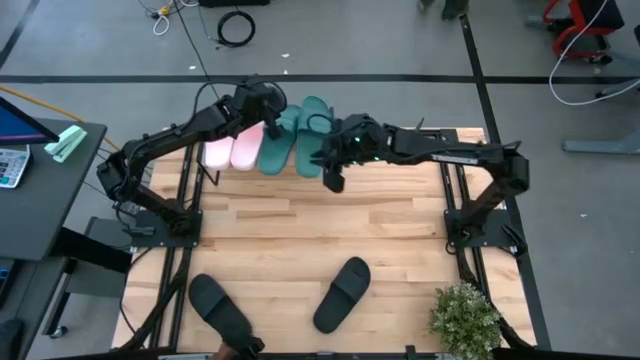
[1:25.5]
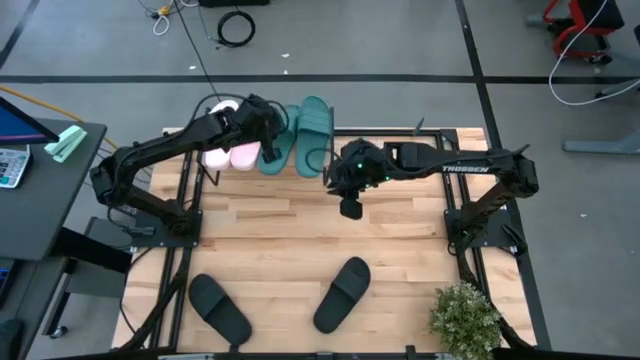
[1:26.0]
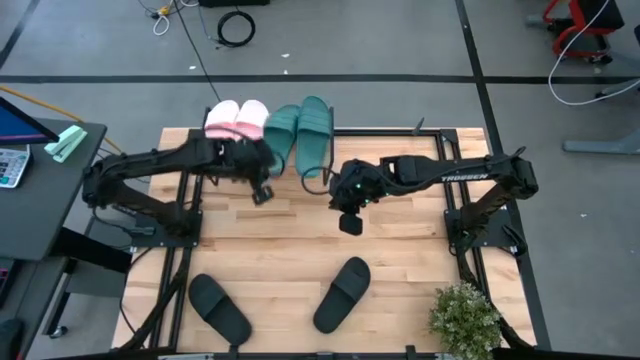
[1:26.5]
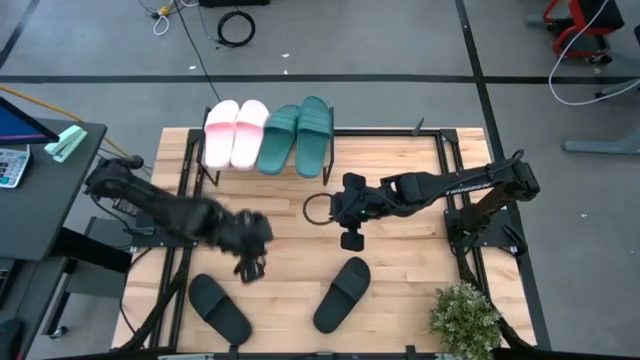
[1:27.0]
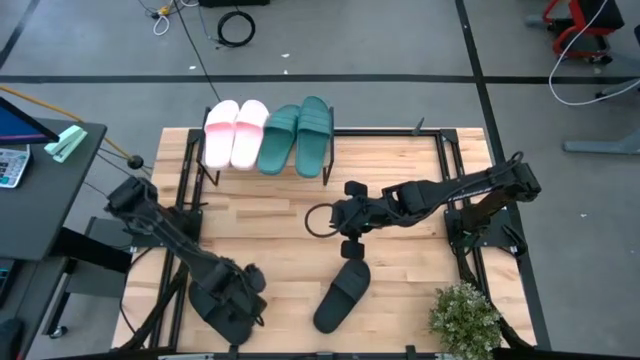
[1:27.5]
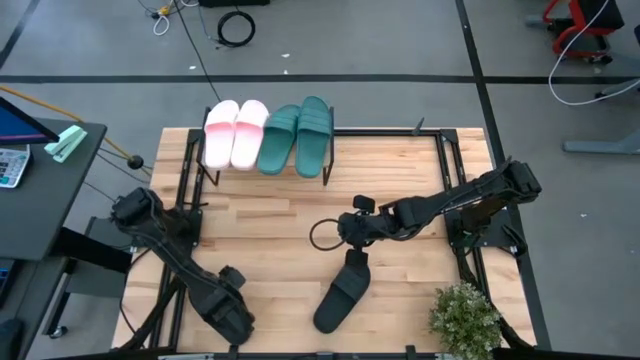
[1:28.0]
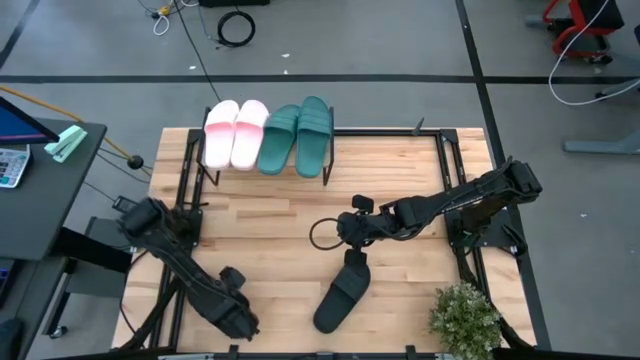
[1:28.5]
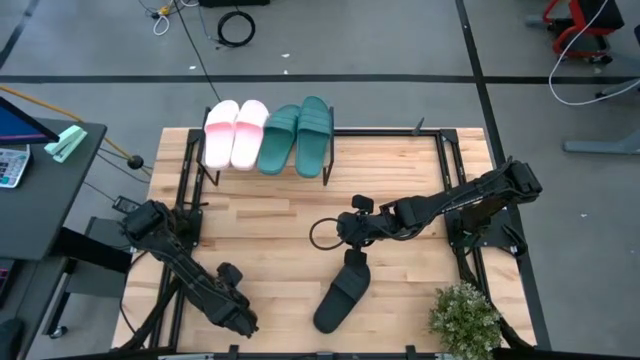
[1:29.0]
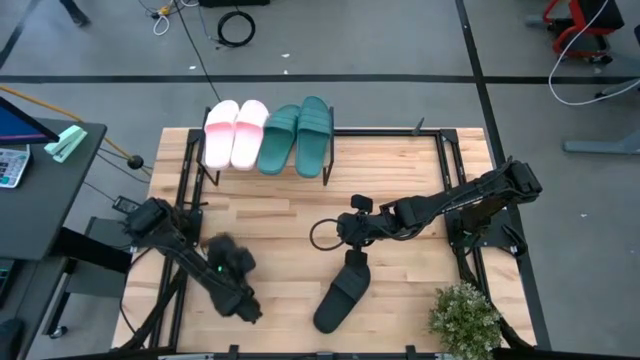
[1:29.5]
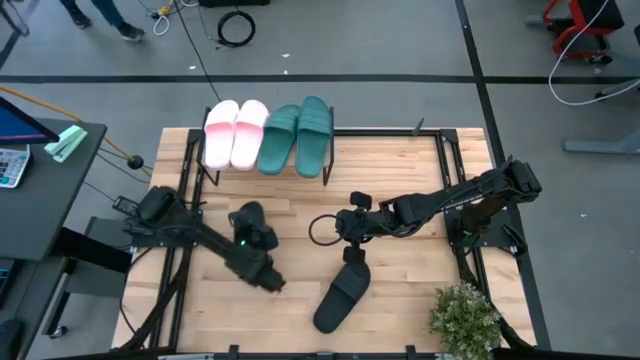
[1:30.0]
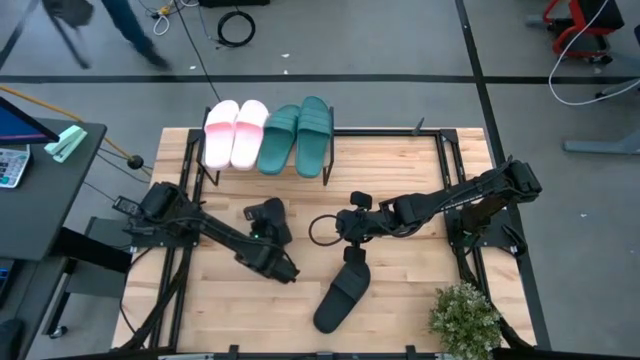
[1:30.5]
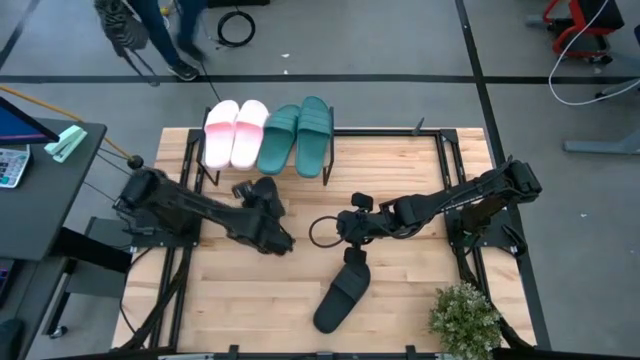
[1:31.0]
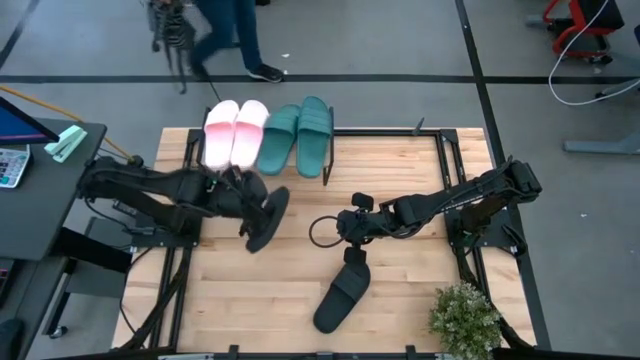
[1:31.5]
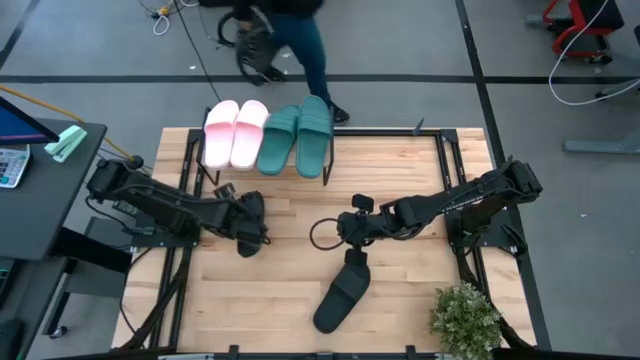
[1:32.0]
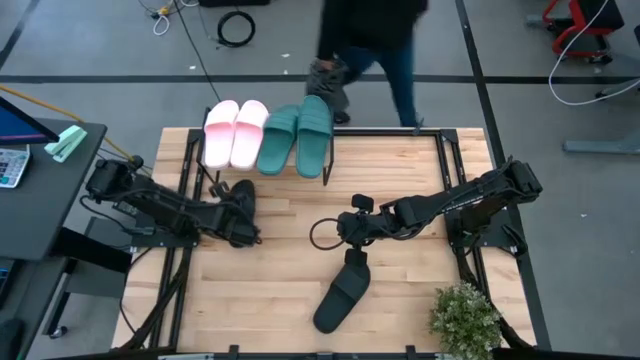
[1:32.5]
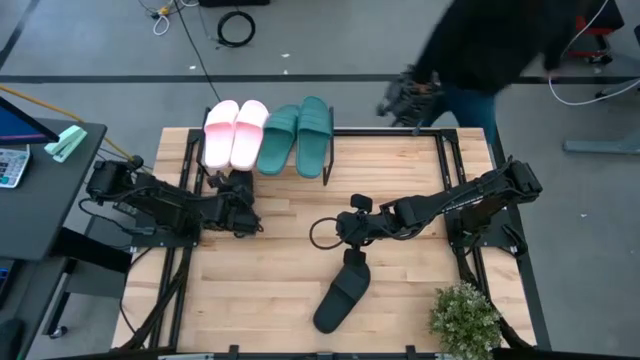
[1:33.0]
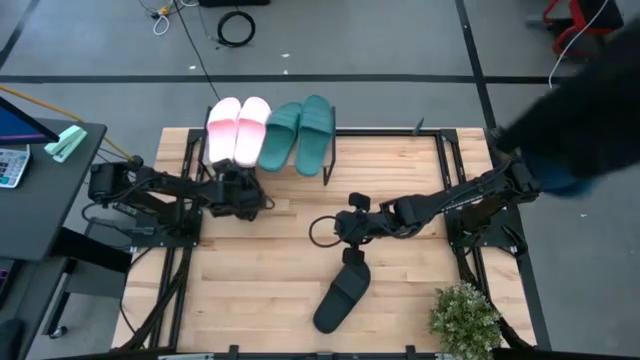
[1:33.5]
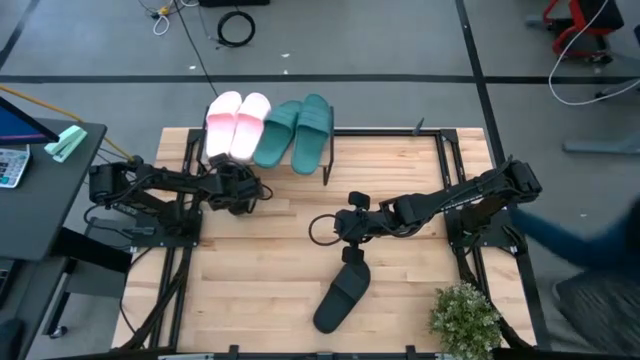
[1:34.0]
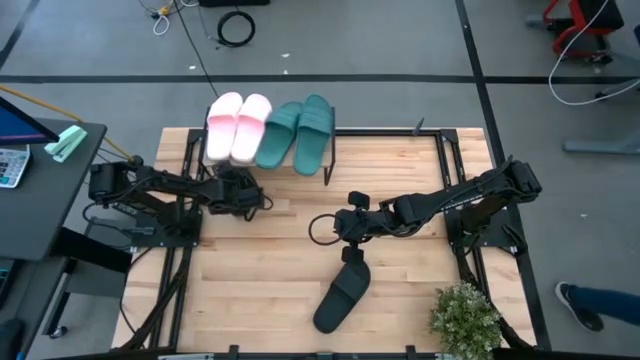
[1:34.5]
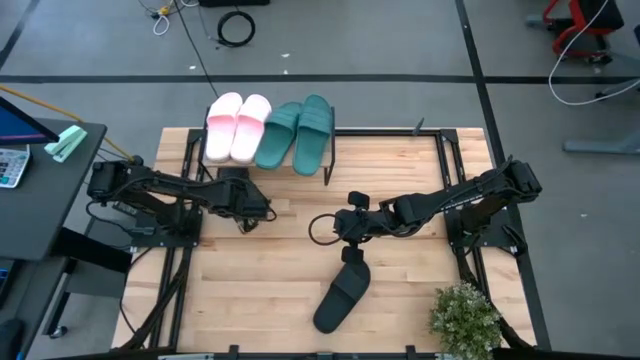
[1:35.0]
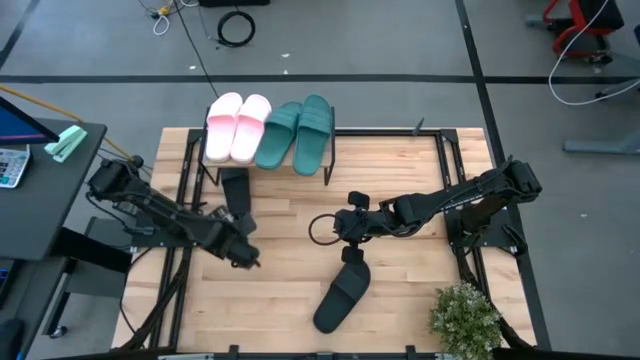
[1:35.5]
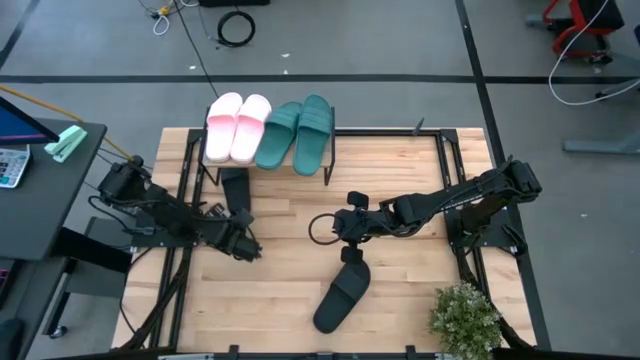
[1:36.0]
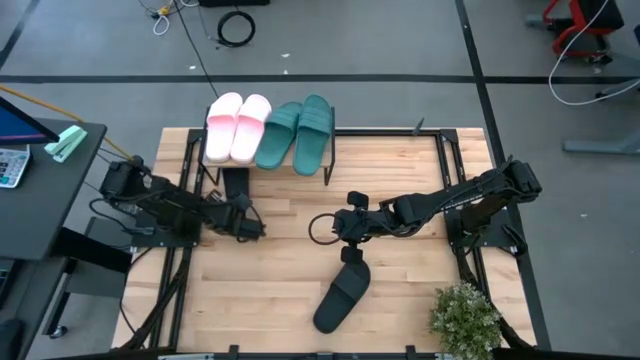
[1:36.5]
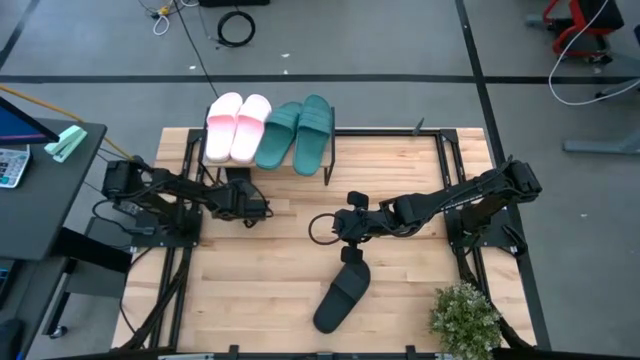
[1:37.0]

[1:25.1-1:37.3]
Task: Pick and place slides into the shelf
Put the left black slide under the shelf

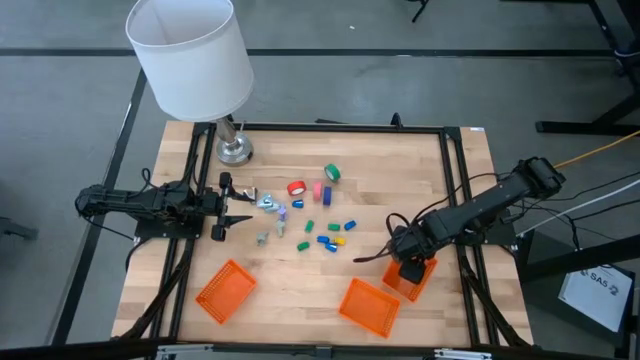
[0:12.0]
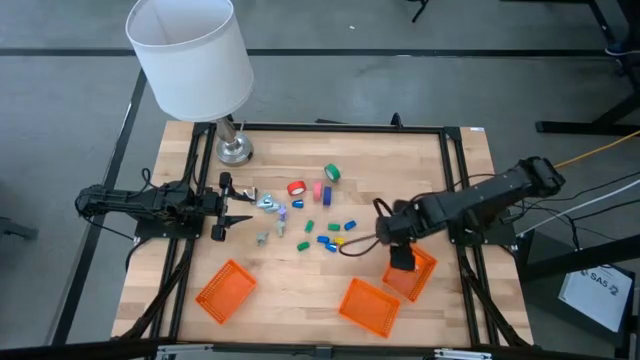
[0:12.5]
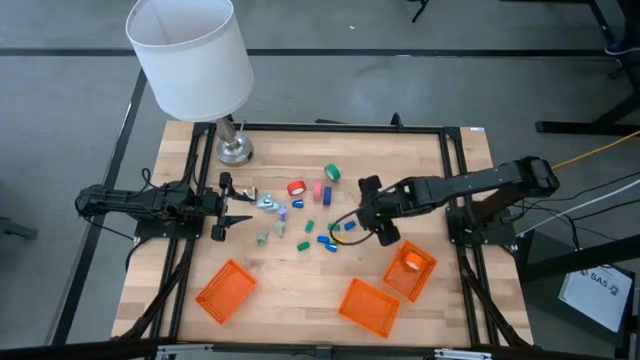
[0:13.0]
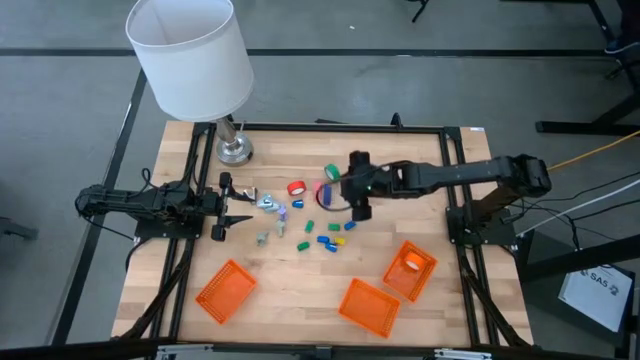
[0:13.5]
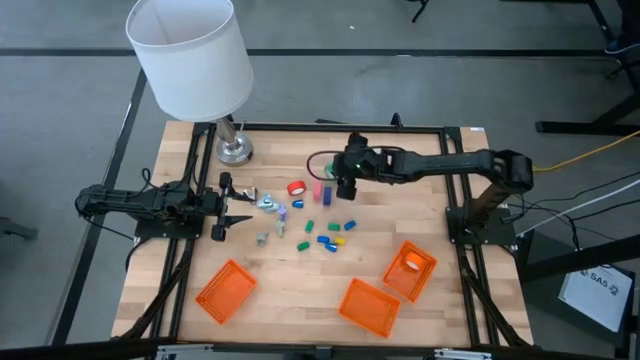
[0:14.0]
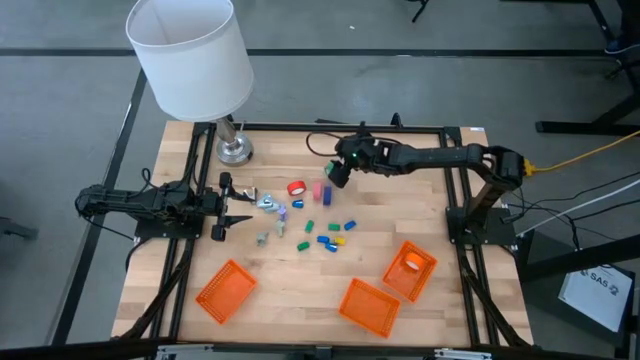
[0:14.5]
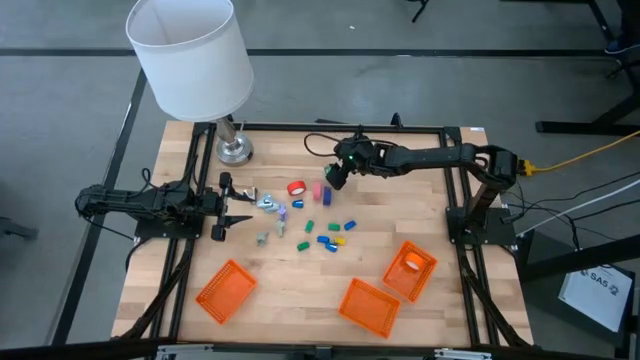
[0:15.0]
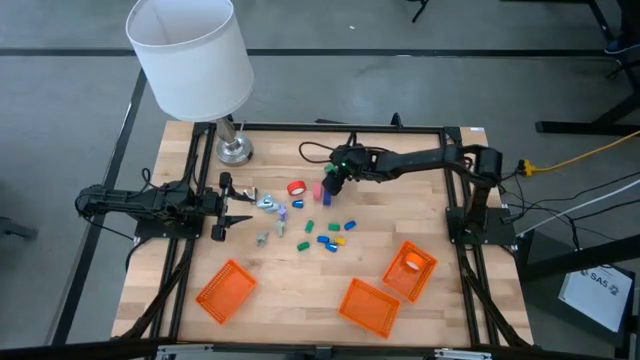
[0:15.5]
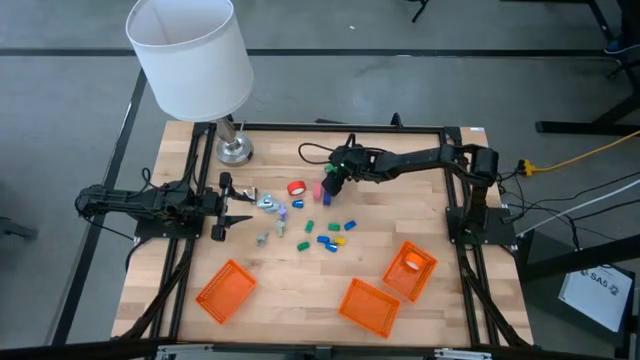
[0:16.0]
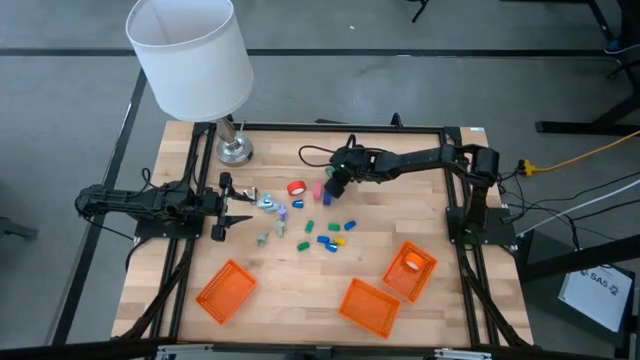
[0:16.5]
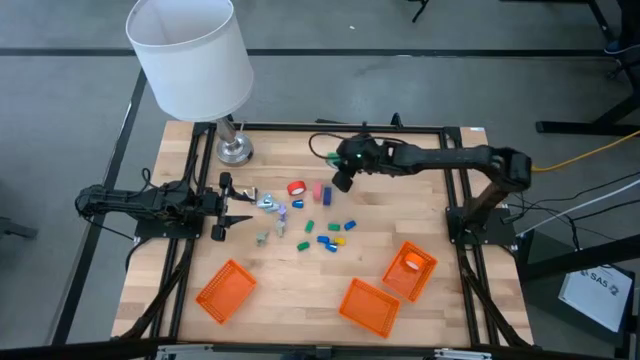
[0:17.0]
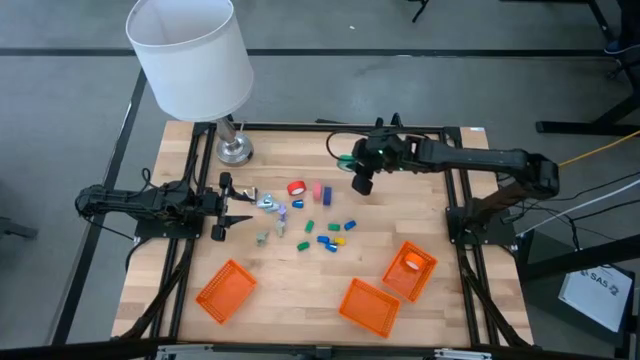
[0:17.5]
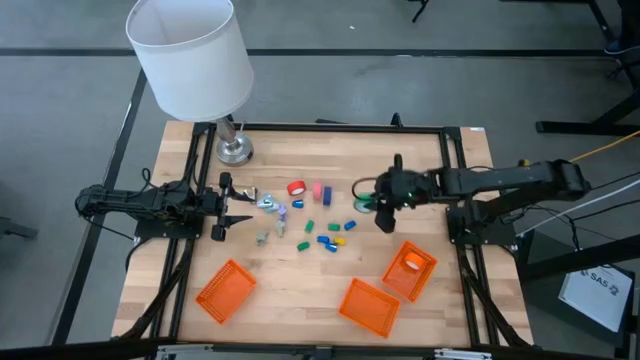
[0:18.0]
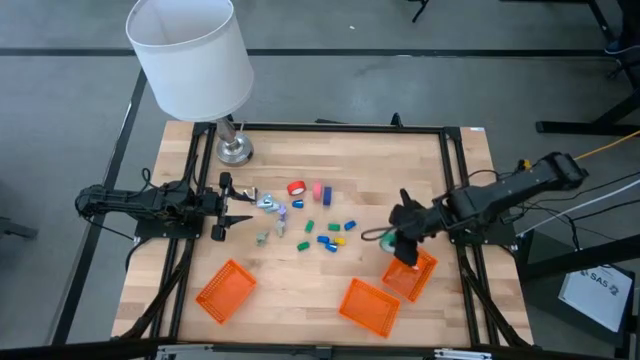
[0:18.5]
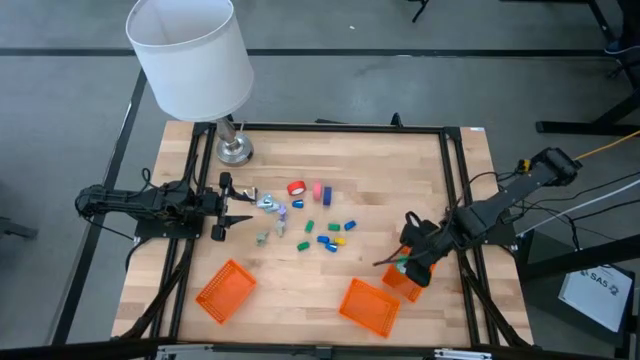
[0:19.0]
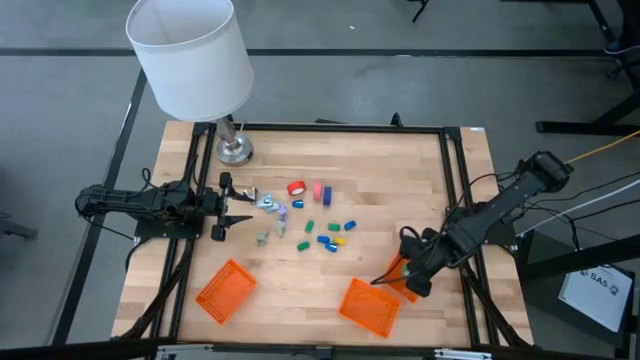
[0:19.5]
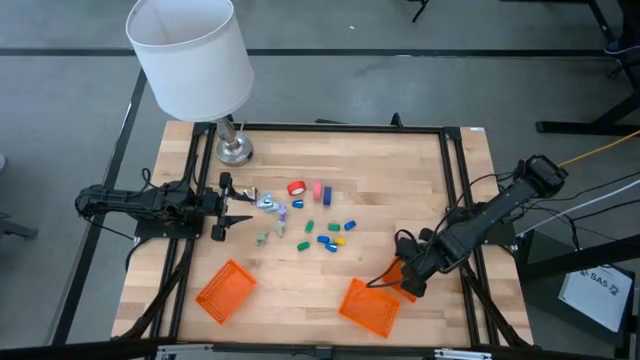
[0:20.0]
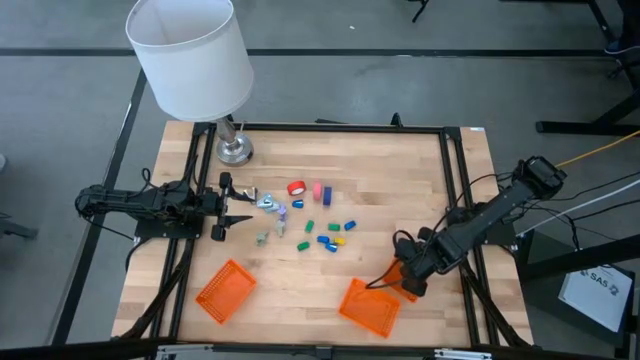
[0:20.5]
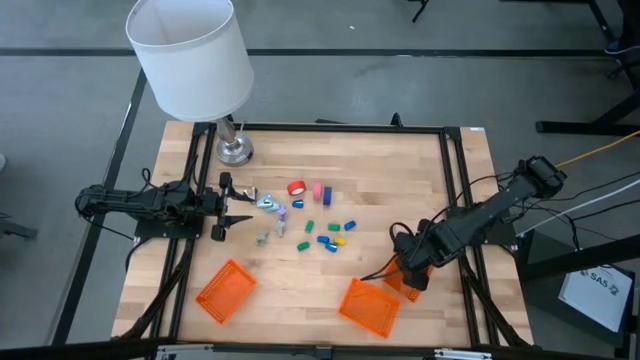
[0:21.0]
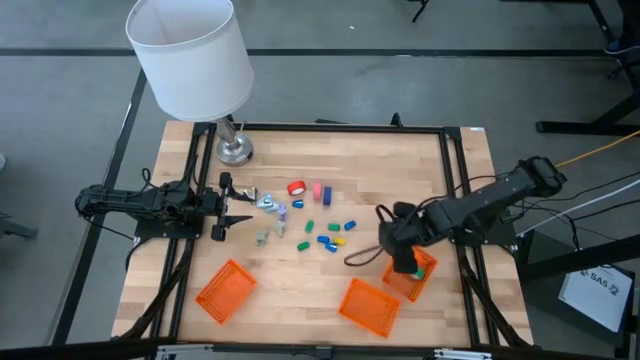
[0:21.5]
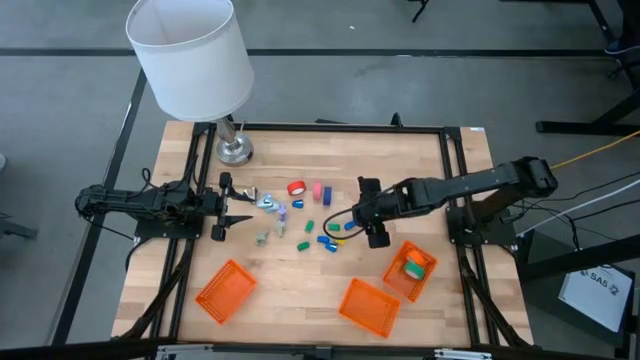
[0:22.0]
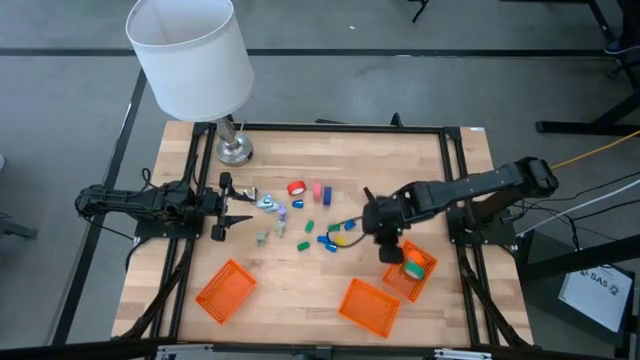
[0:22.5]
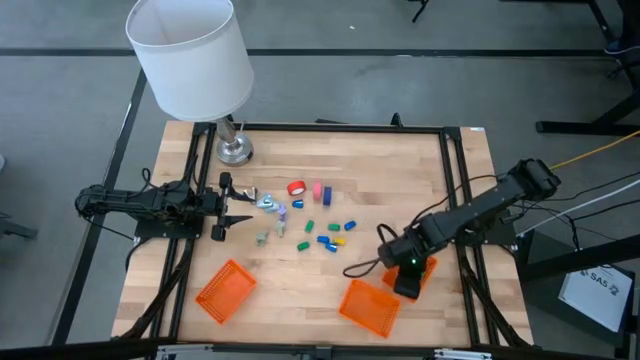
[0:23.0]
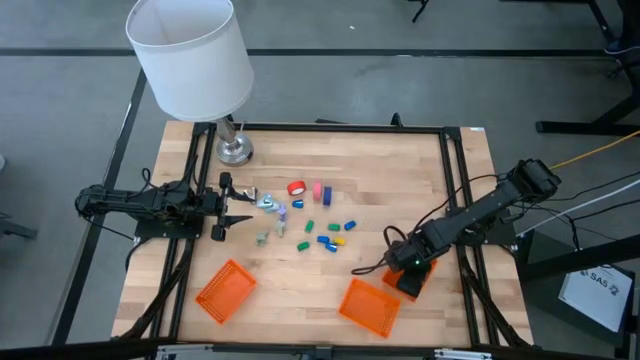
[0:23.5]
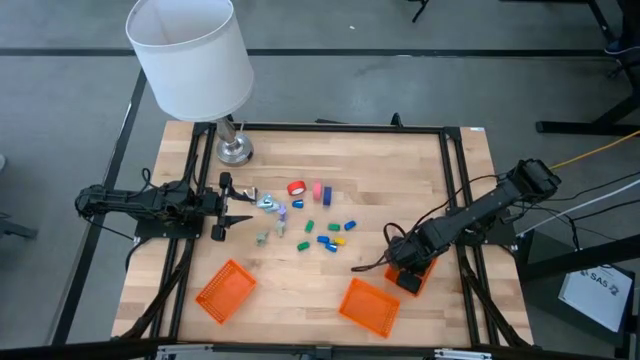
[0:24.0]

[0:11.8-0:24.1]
Task: Pick and place Stapler, Stapler remover, tape
Put the green tape into the right orange bin
